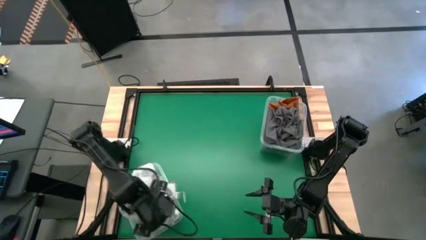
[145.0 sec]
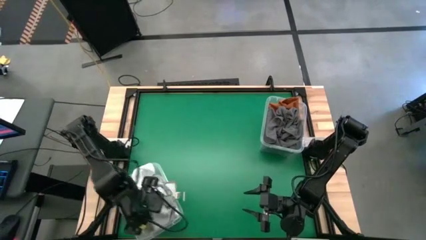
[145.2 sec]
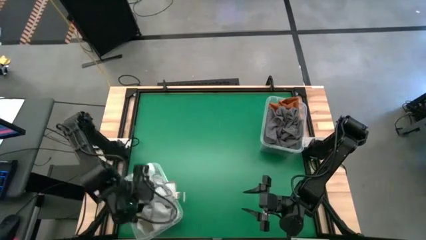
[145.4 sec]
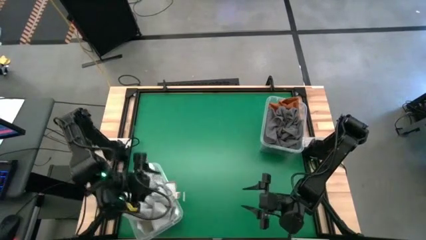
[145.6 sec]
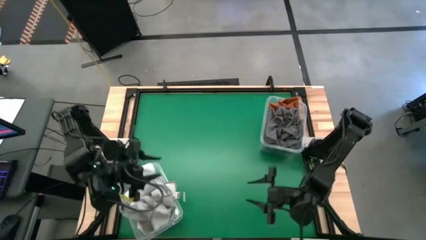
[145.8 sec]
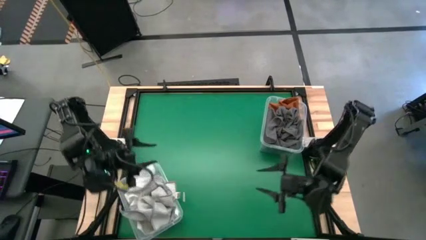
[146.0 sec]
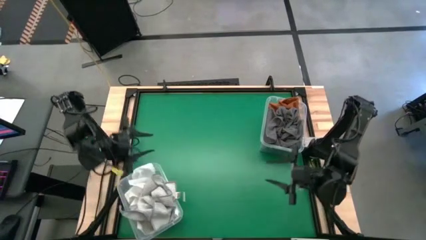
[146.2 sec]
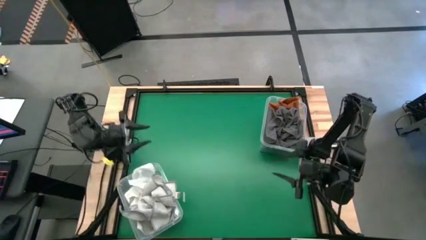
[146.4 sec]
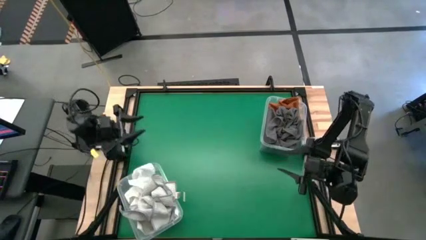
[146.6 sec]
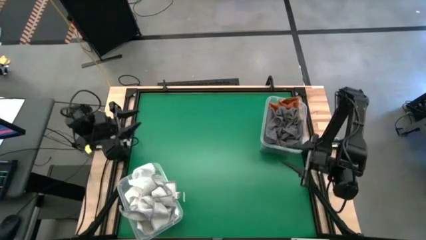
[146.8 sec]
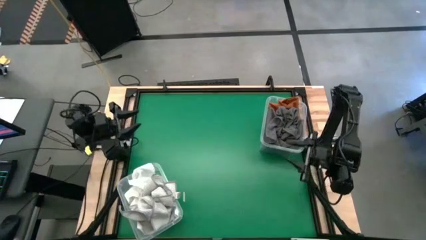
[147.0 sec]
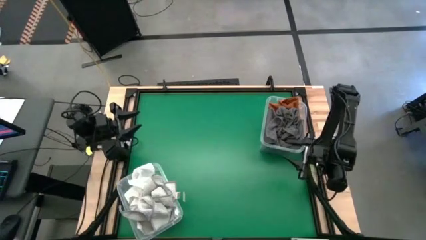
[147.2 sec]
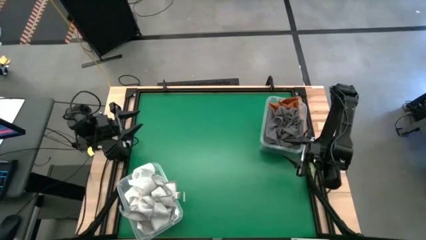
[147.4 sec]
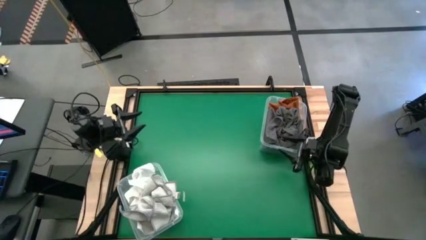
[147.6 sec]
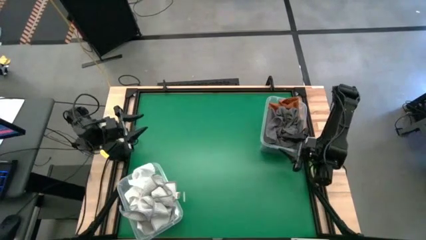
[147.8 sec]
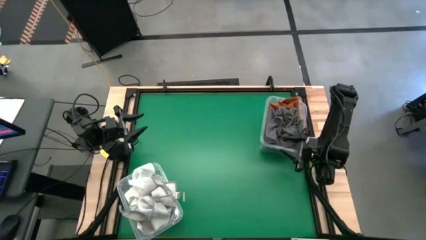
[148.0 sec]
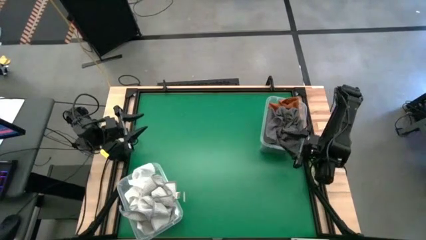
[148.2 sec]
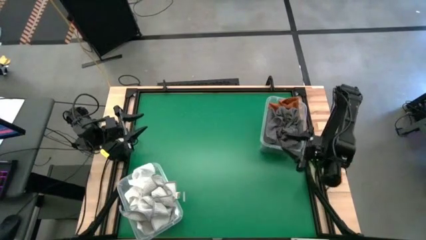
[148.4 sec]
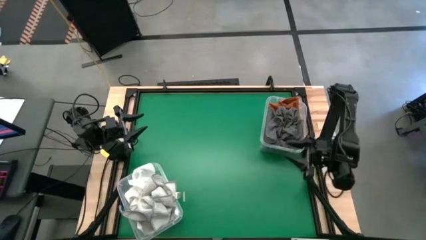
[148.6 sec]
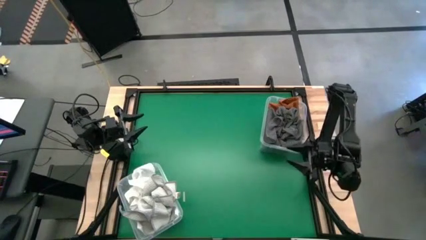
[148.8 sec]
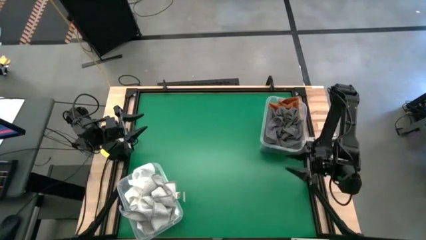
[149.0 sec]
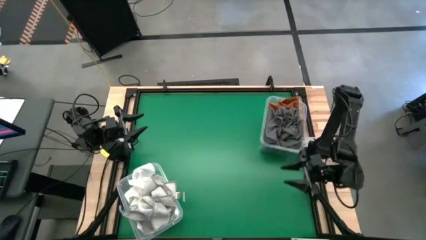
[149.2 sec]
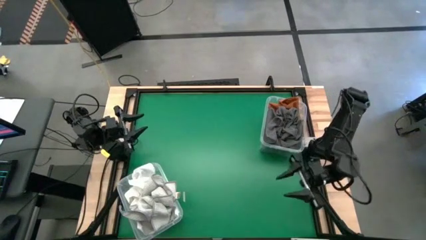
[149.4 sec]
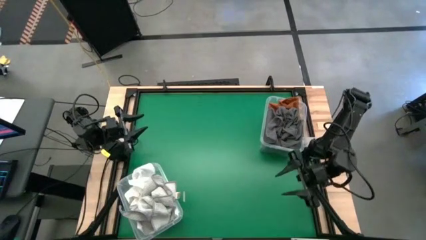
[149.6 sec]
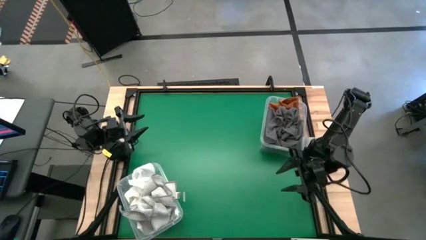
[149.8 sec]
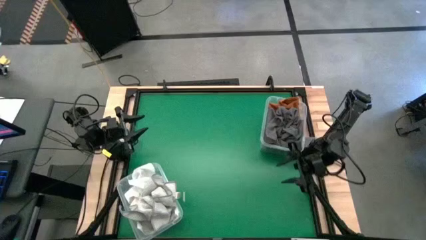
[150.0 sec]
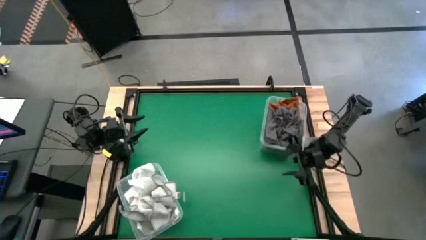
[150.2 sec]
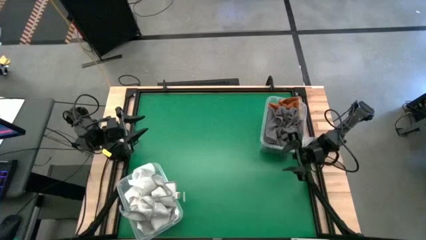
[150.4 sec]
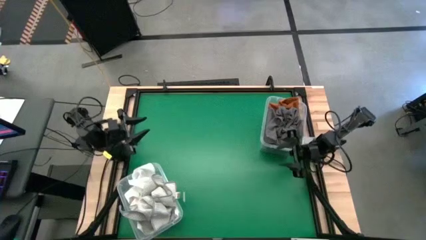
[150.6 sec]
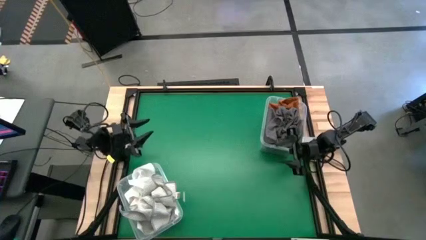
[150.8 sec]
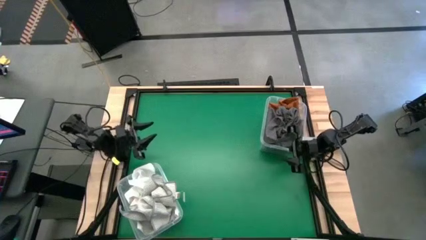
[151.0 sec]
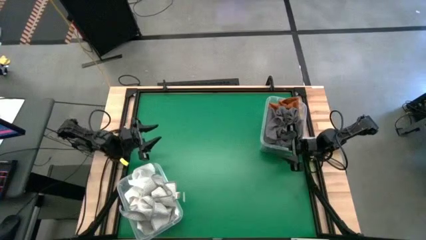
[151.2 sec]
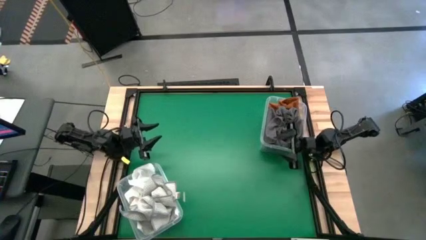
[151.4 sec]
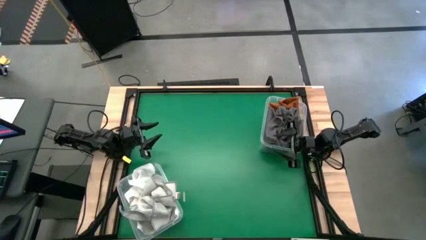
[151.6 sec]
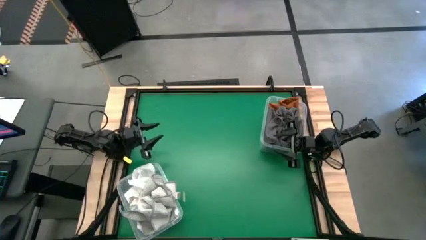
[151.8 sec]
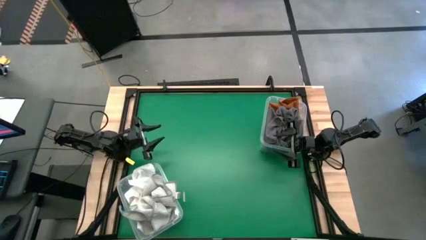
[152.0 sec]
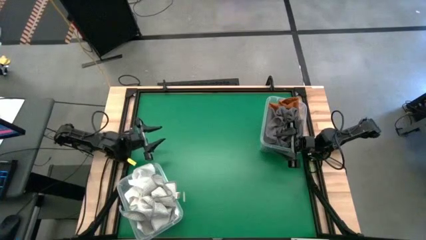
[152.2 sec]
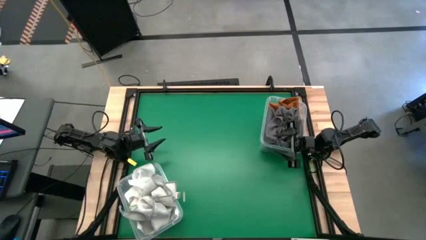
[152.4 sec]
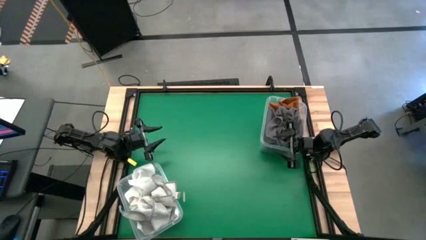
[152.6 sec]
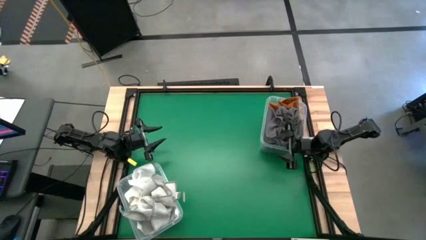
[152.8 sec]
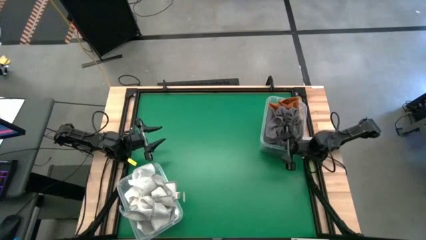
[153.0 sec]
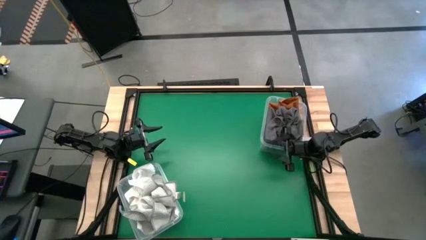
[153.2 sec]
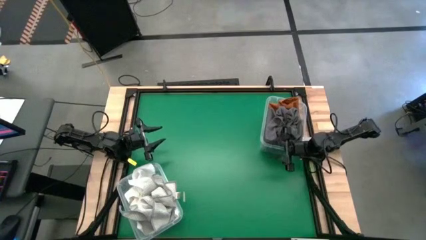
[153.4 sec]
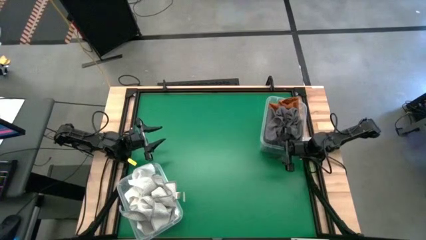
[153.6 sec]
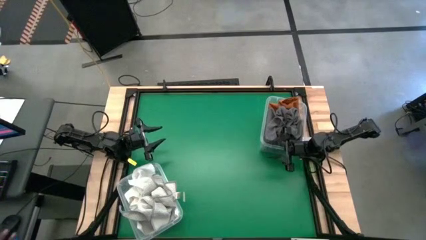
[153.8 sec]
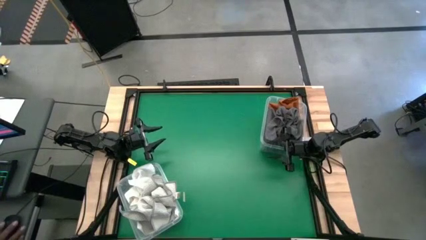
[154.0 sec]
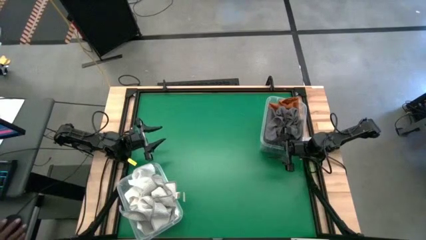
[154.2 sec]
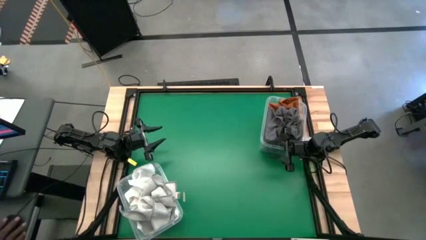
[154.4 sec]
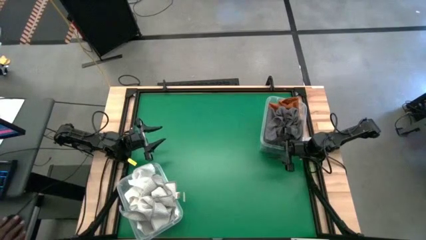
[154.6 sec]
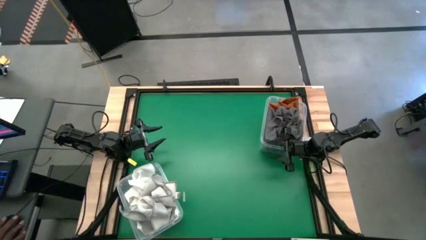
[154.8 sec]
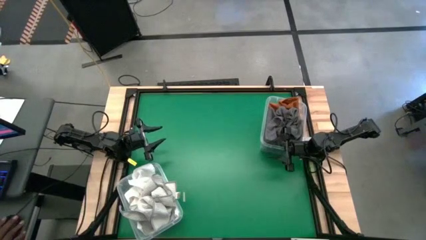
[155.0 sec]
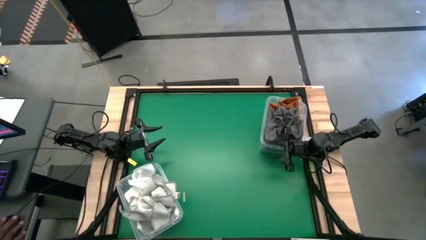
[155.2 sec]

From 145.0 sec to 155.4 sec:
Task: Sort towels by color in basket
Return to Home Position
